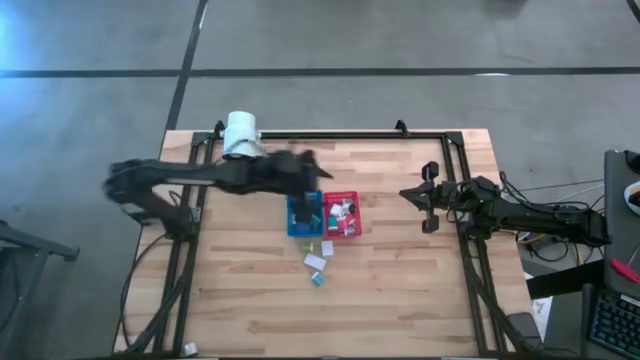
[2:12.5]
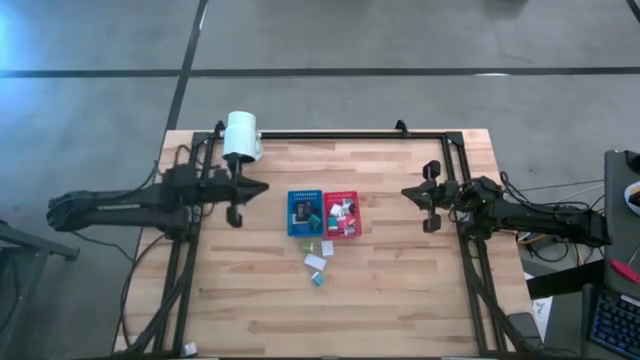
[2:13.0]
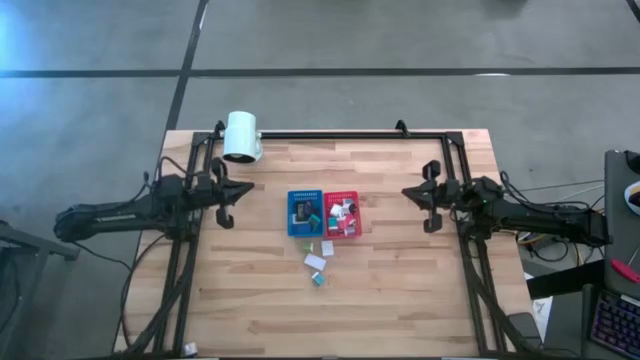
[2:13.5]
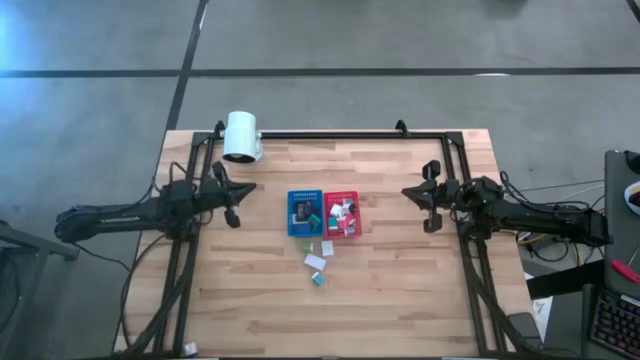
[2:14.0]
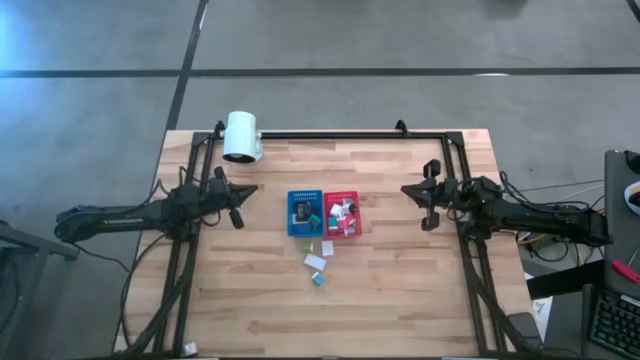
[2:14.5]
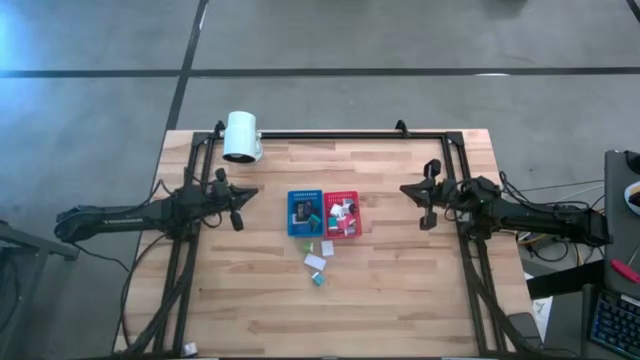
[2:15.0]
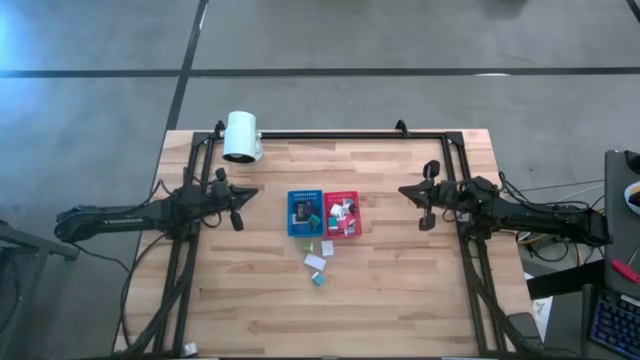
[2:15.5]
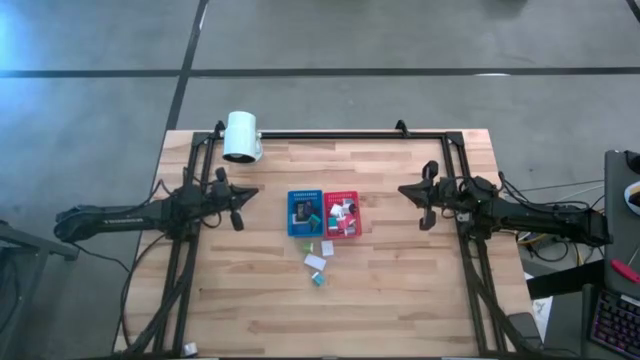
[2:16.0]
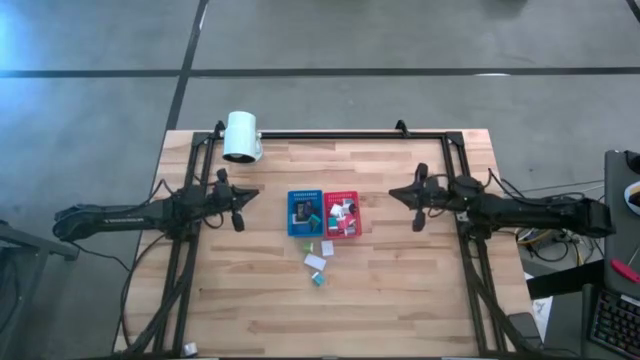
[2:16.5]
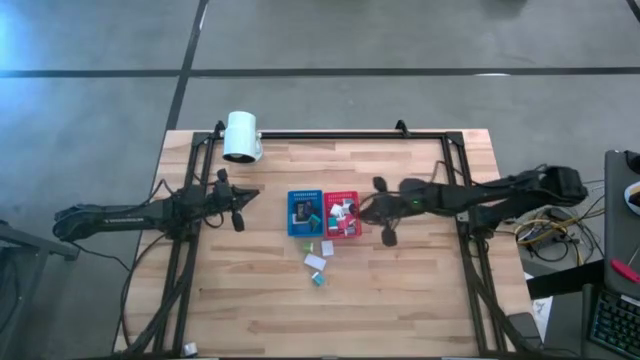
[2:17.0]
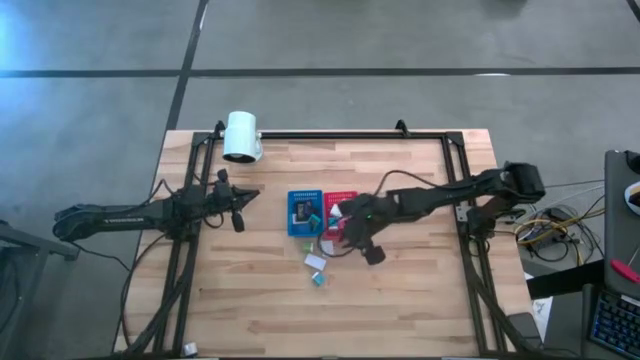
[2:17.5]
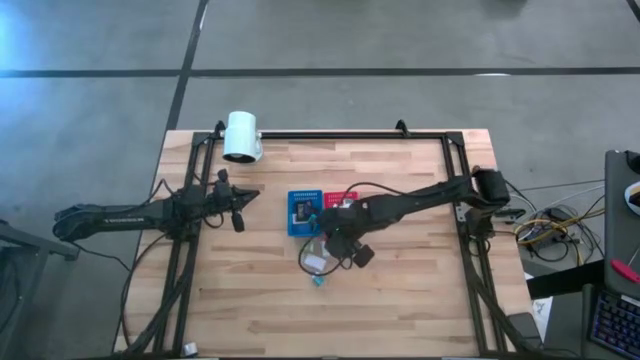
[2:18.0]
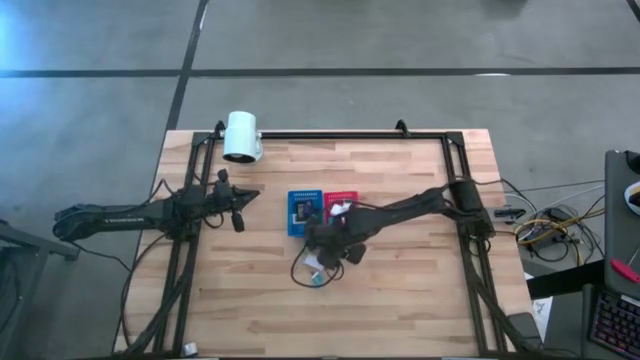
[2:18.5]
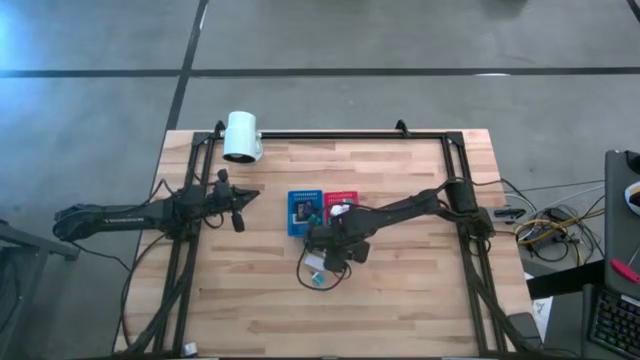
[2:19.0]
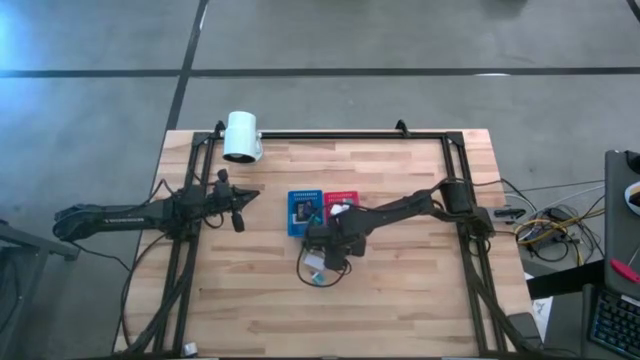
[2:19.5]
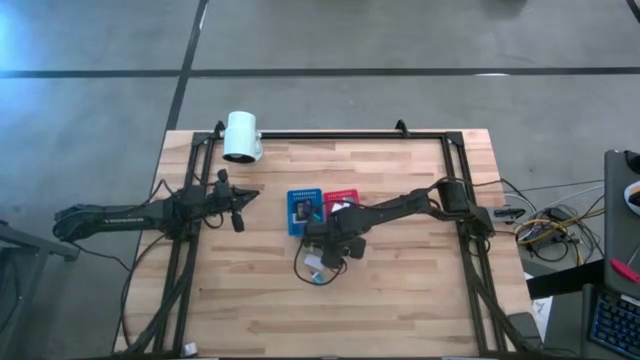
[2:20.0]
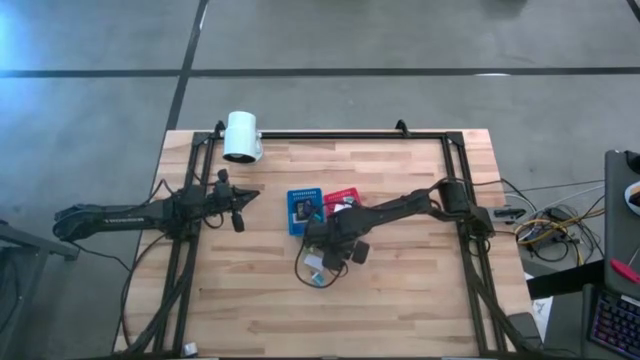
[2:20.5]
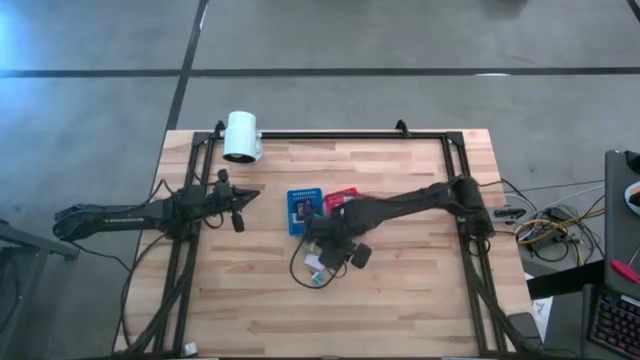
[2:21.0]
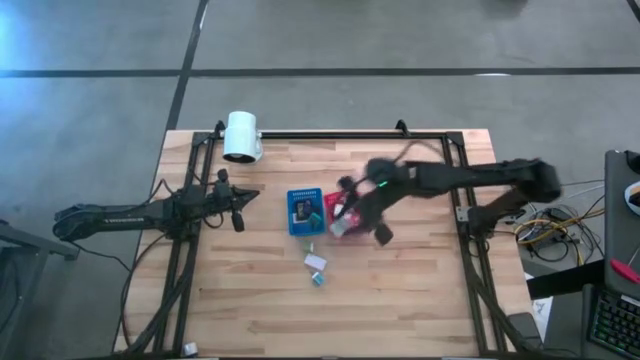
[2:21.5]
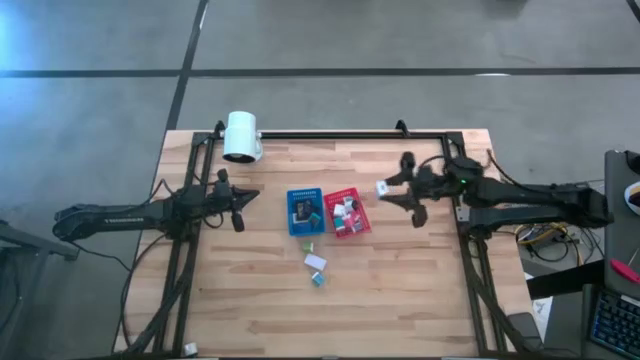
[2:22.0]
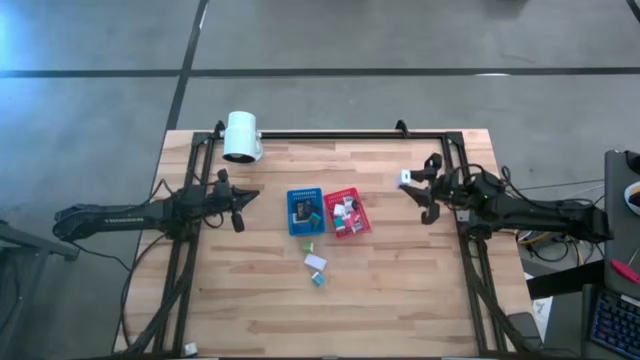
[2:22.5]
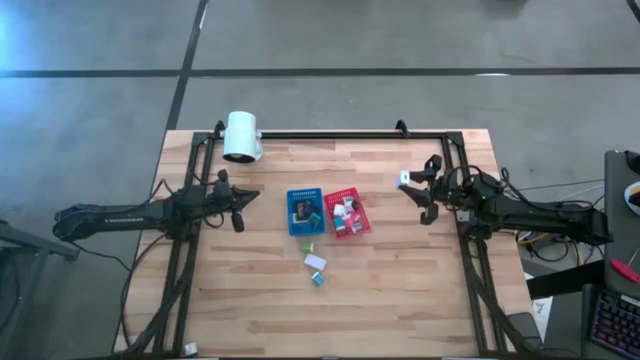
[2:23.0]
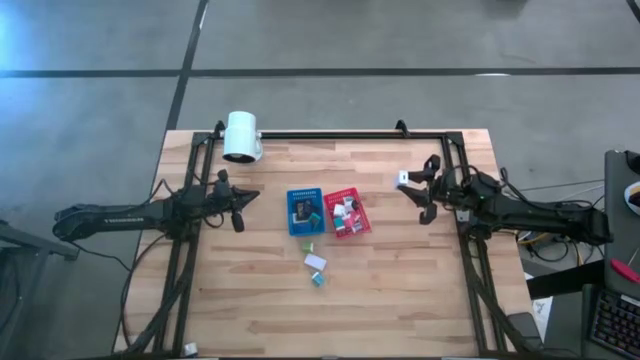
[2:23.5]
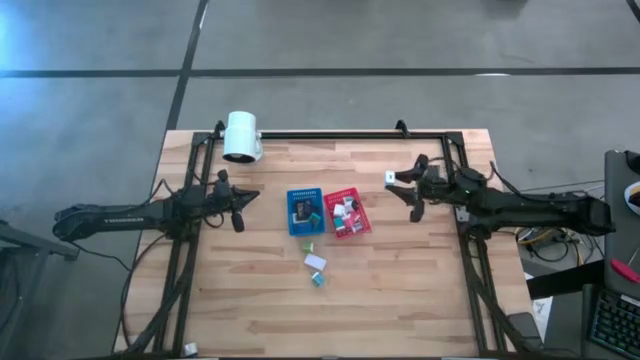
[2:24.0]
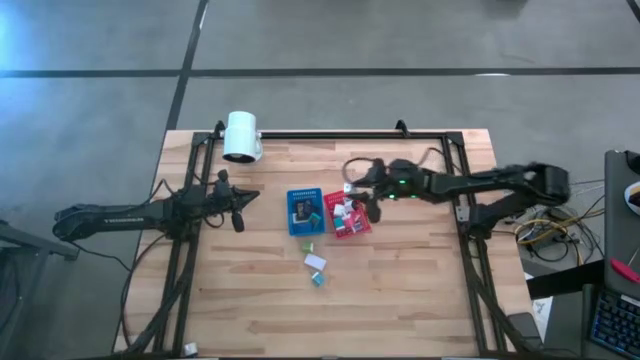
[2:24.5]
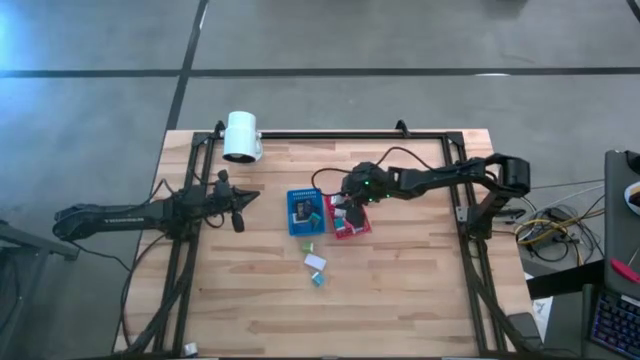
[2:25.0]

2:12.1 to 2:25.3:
Task: Pick & Place Office items
Put the white charger adapter into the red bin

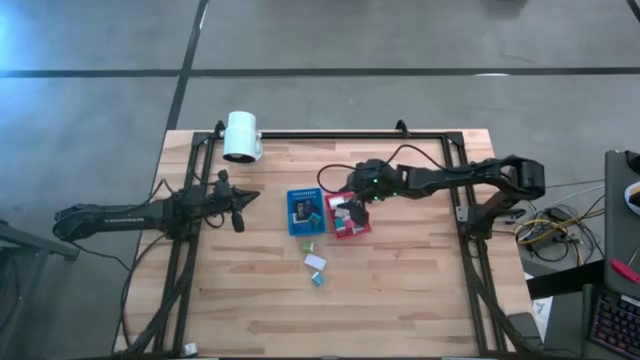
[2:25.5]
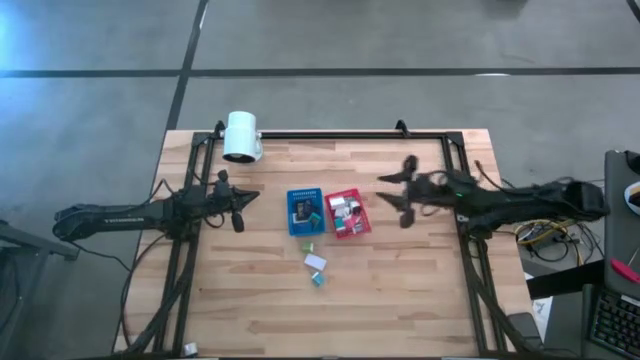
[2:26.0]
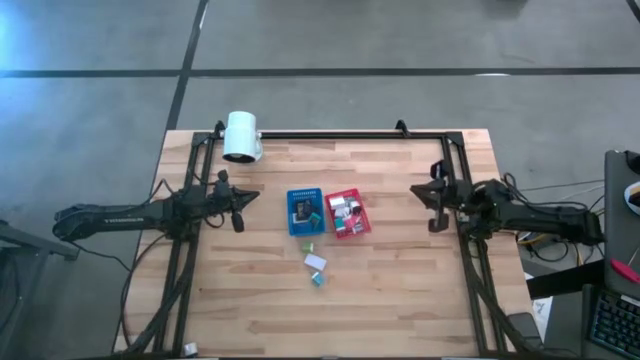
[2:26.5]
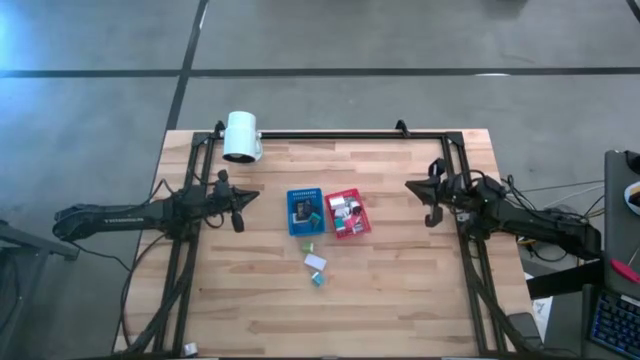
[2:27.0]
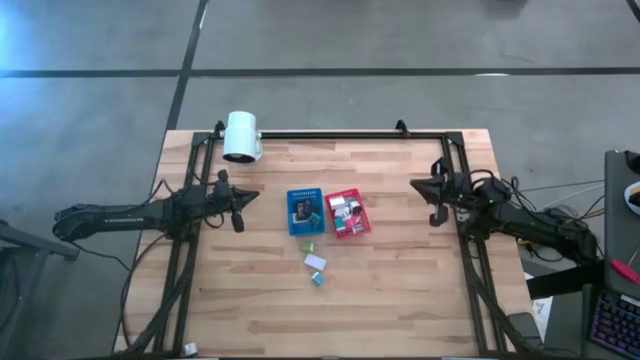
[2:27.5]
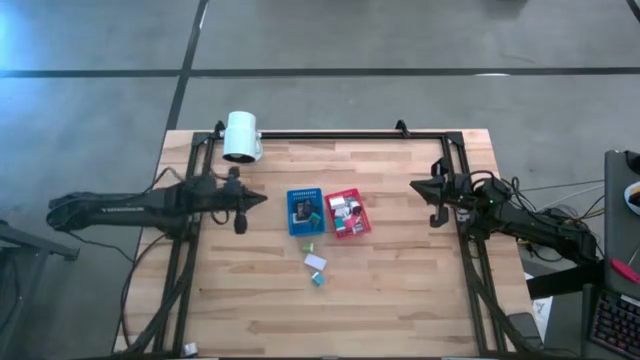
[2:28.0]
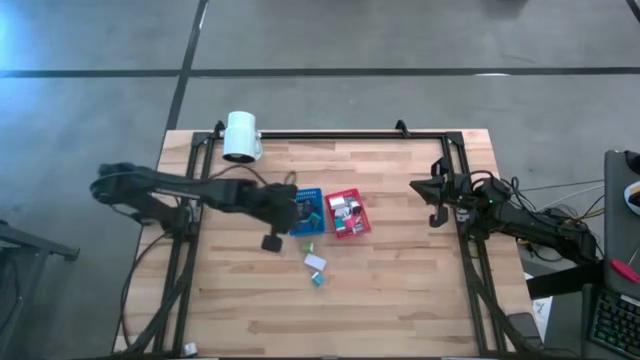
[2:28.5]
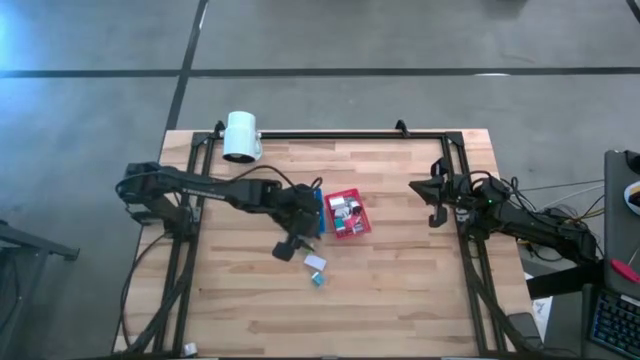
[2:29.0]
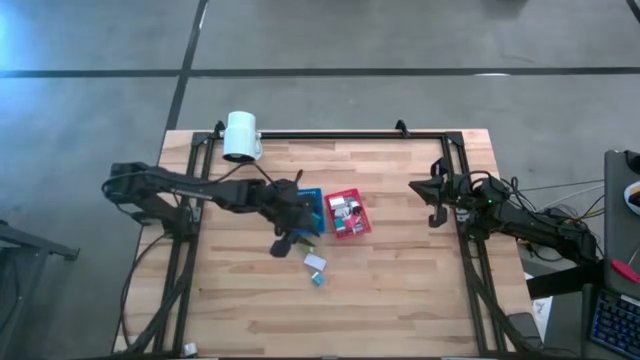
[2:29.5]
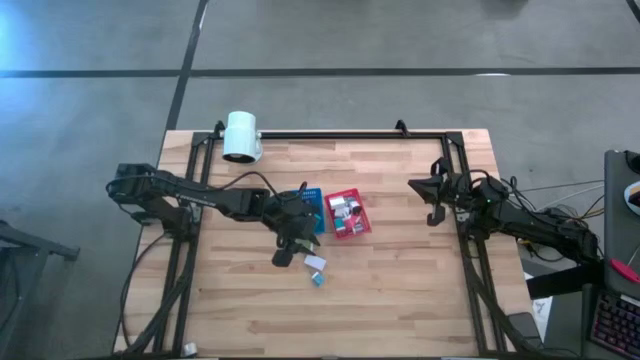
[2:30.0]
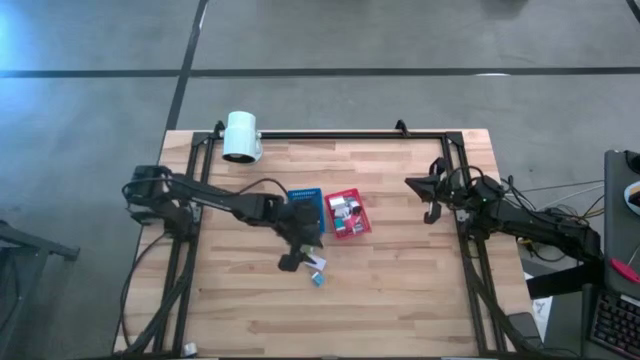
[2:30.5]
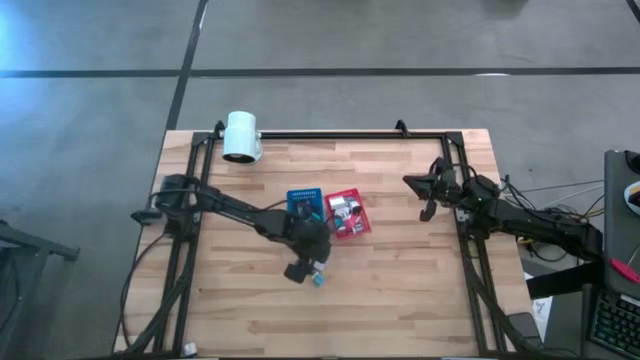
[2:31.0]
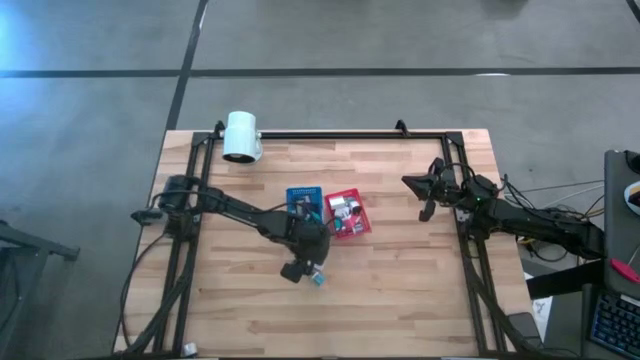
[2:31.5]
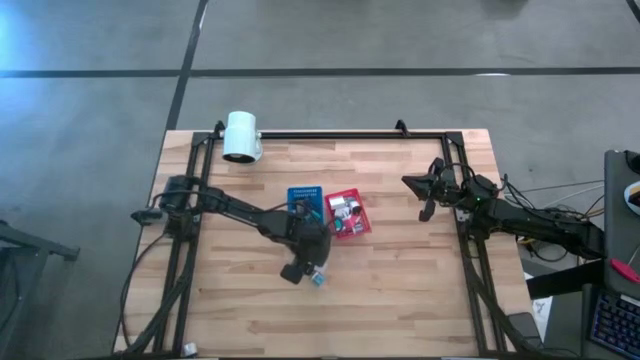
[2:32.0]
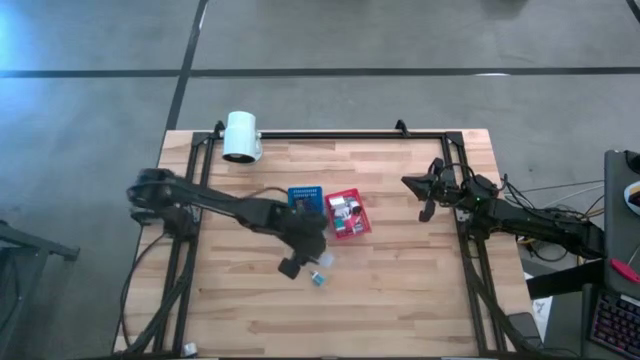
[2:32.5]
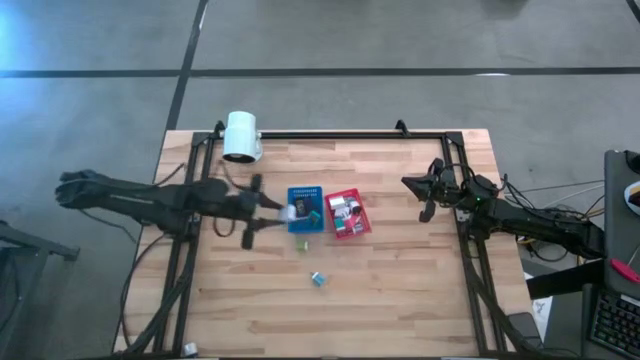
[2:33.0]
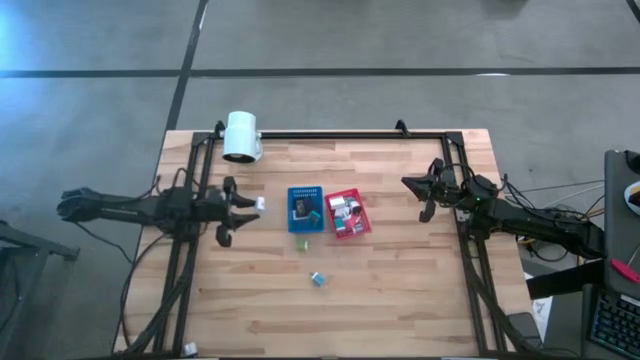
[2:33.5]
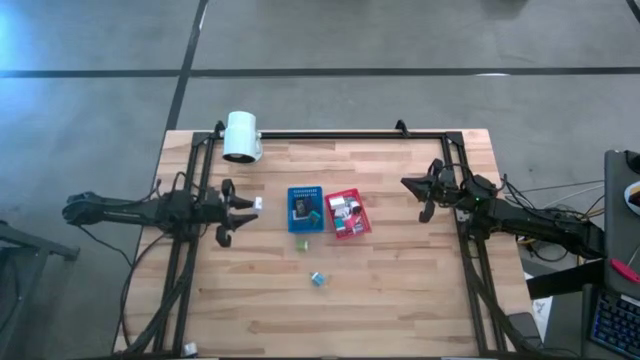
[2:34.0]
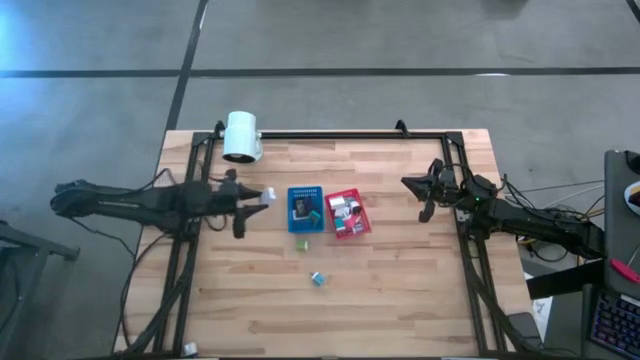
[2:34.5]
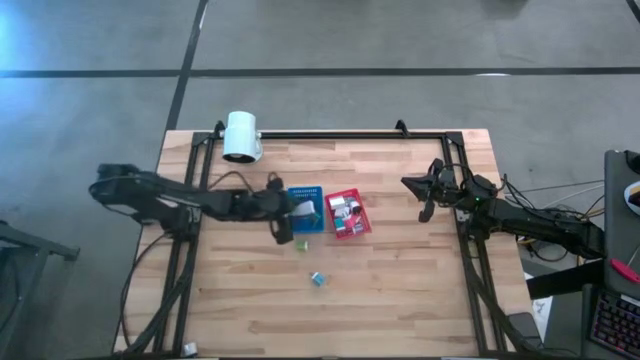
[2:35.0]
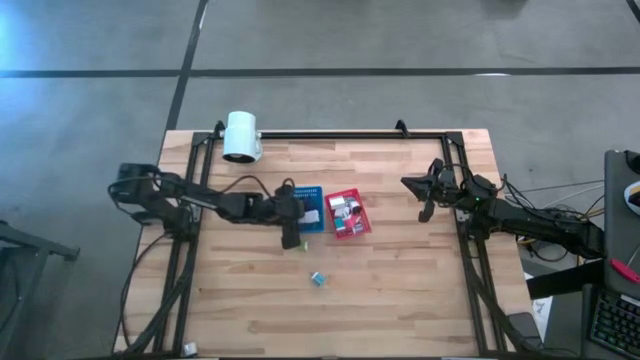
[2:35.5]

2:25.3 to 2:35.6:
Put the digital timer into the blue bin
